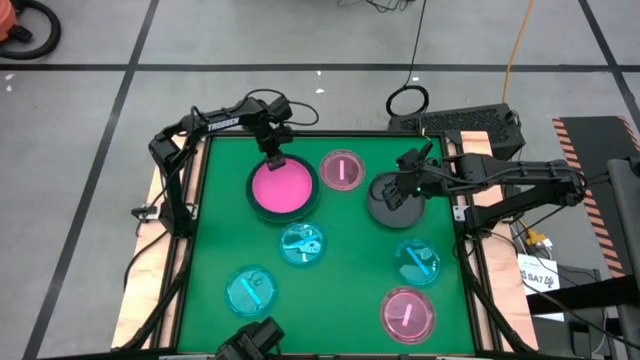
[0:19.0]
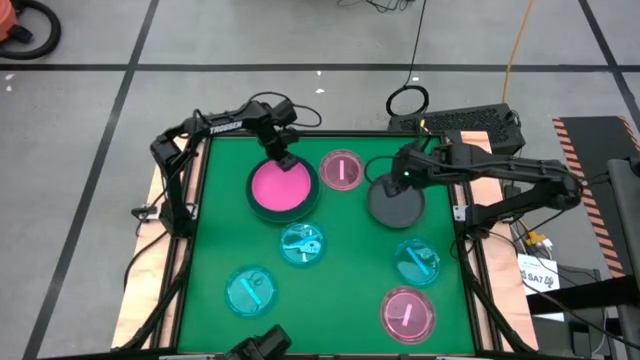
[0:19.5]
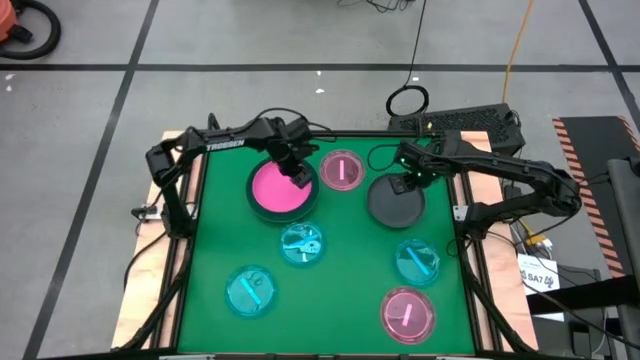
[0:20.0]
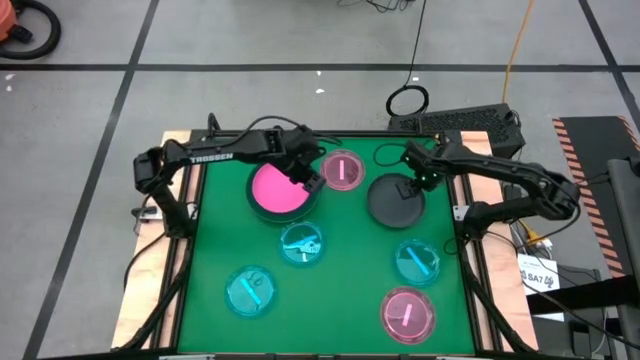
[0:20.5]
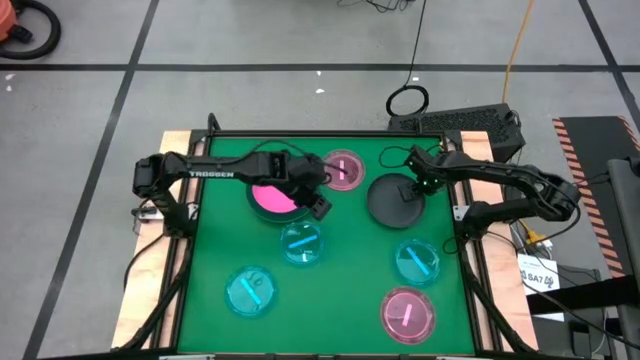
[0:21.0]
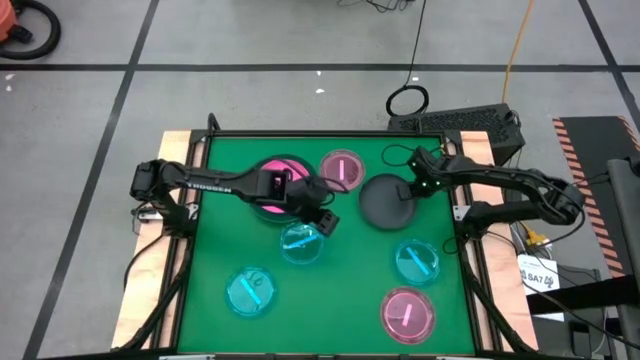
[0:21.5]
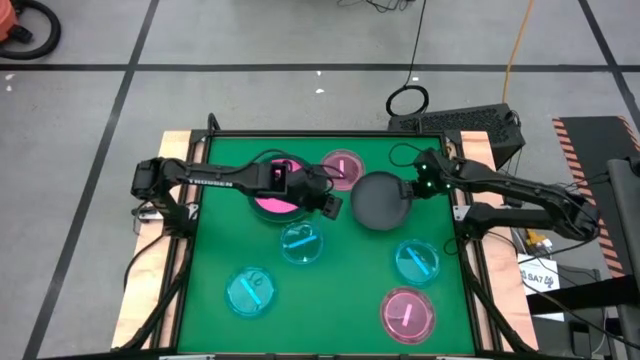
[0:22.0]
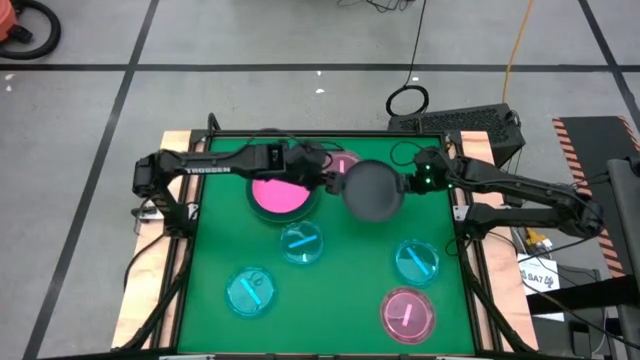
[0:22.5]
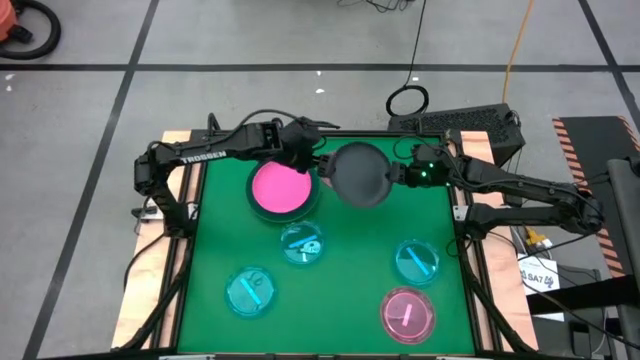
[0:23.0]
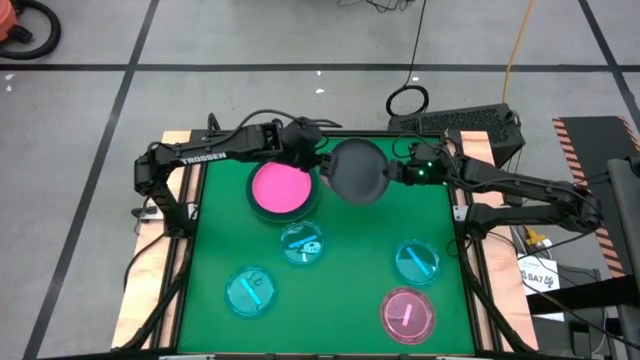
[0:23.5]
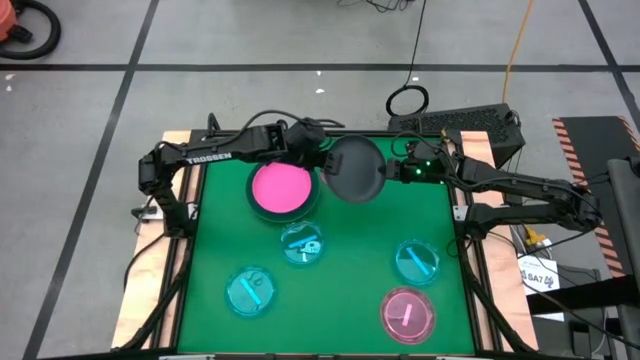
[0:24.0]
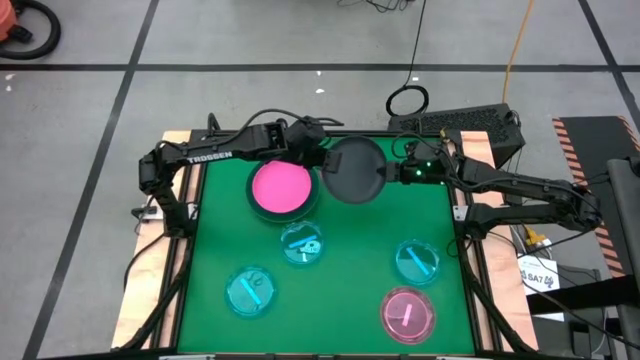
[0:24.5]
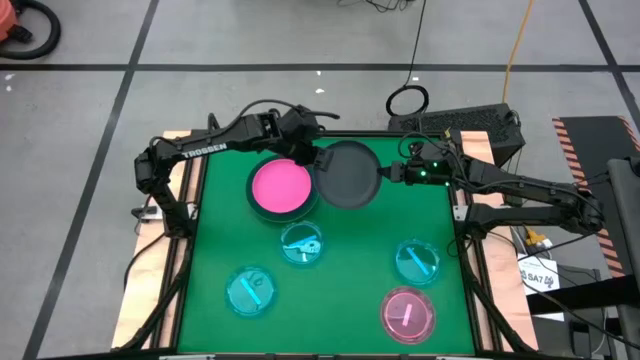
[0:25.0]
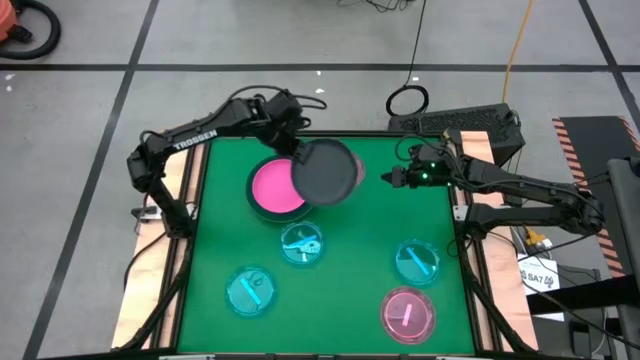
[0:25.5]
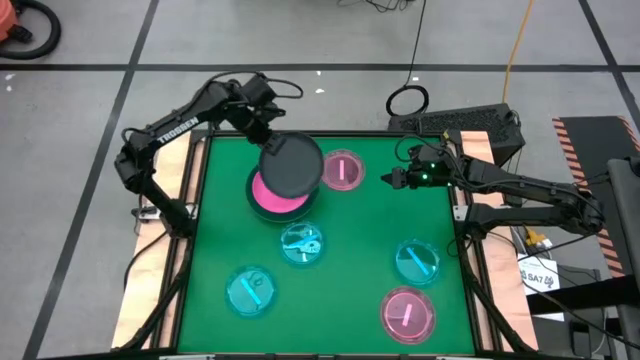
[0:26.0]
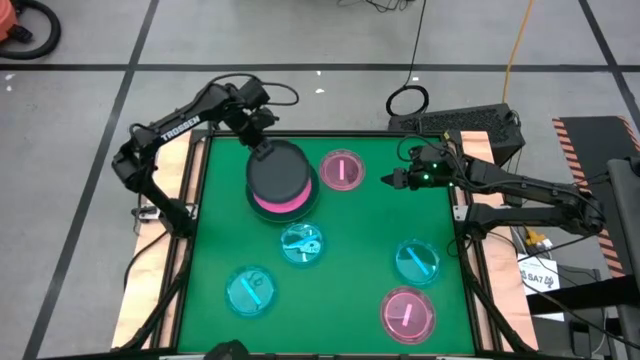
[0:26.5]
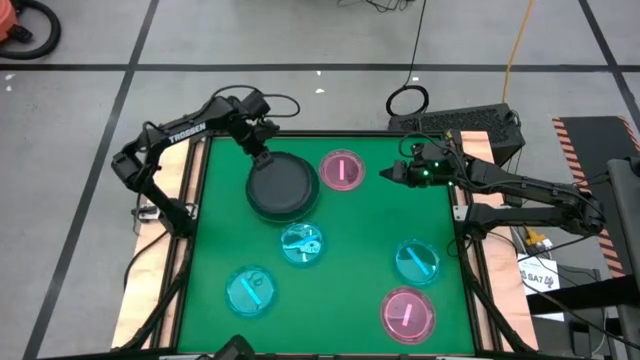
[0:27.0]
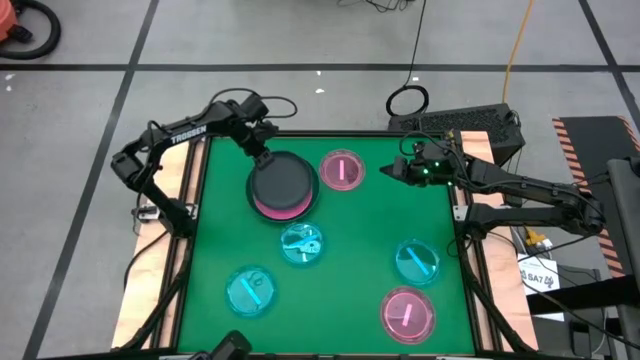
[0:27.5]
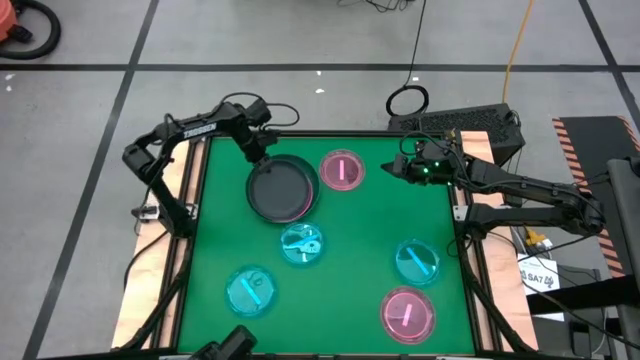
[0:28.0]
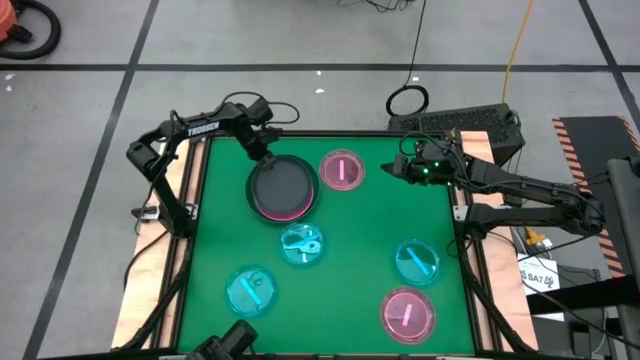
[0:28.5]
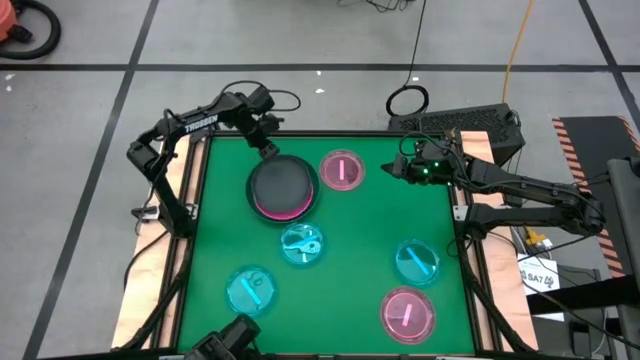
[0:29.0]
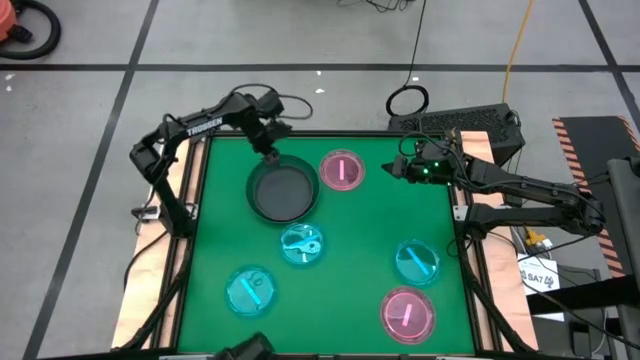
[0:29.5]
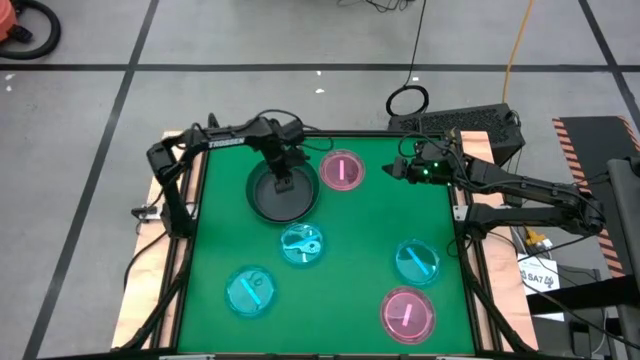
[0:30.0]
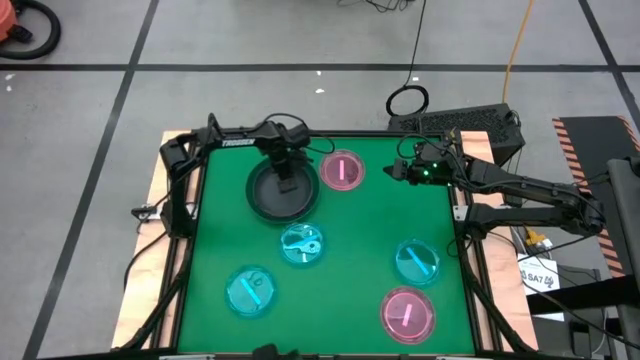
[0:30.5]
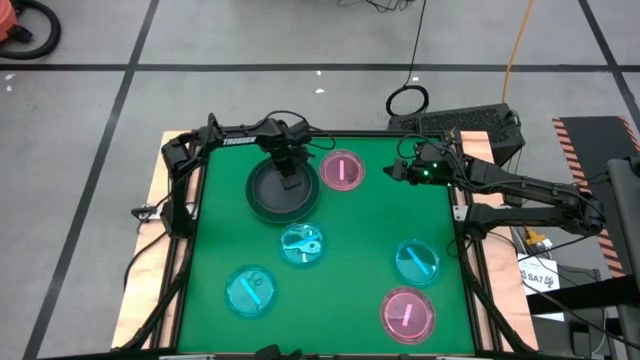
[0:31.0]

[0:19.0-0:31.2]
Task: Stack plastic plates
Stack the black plate on the pink plate

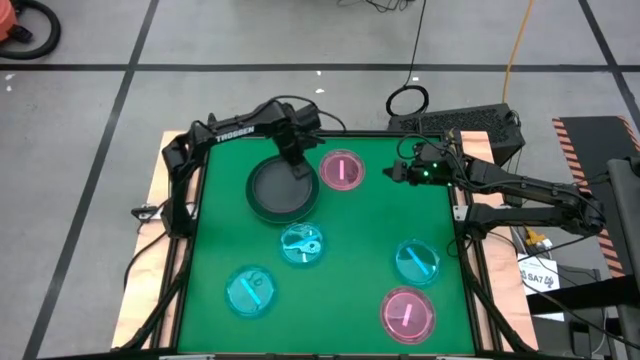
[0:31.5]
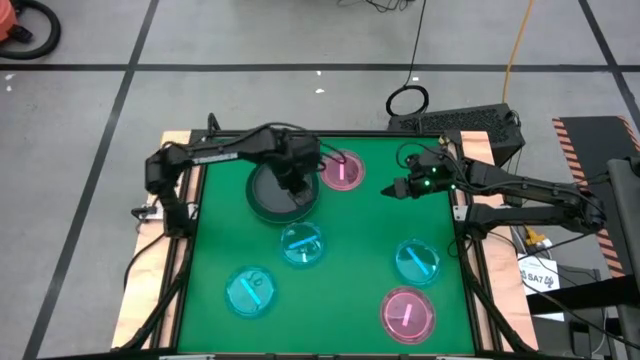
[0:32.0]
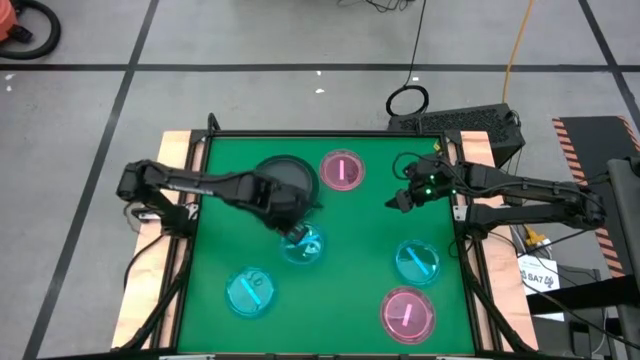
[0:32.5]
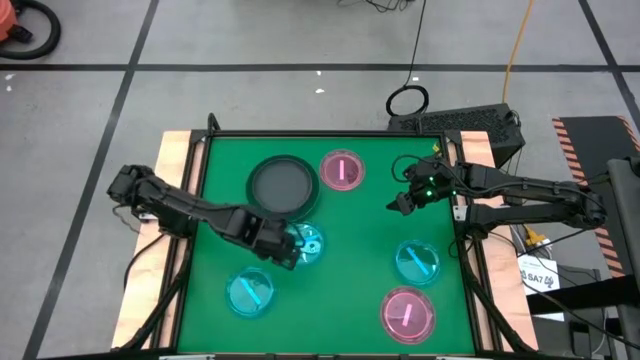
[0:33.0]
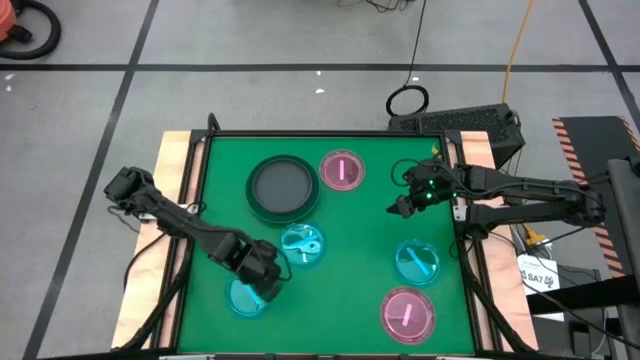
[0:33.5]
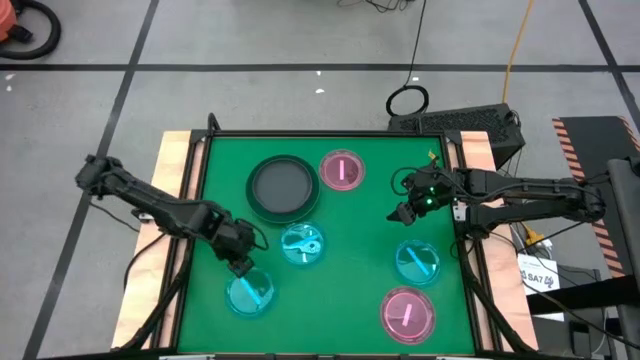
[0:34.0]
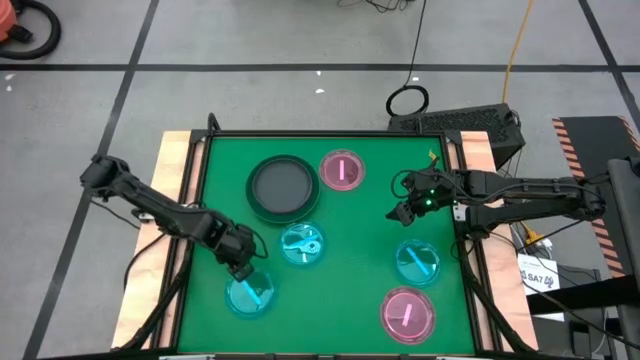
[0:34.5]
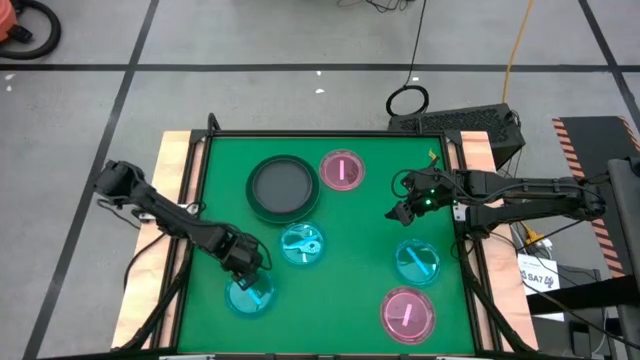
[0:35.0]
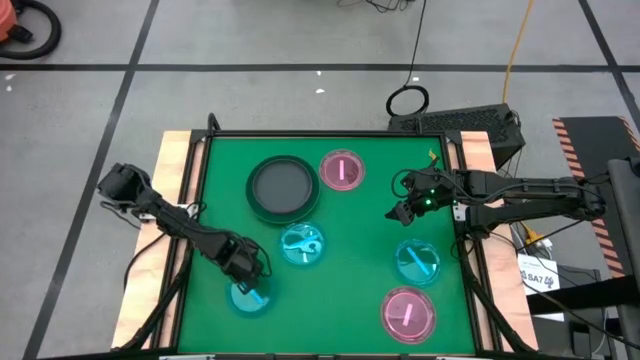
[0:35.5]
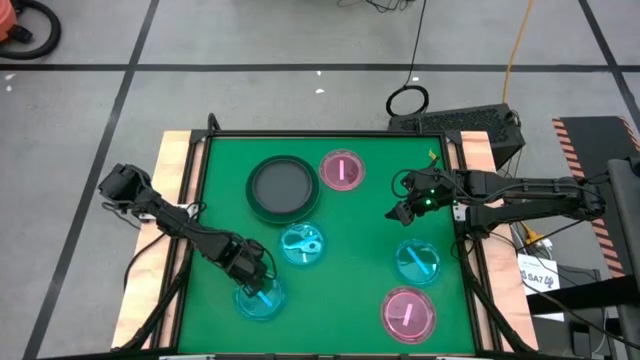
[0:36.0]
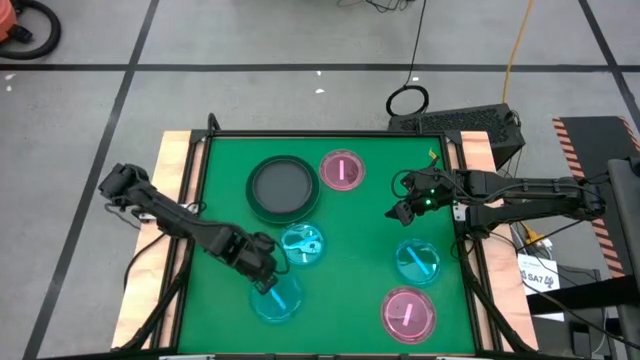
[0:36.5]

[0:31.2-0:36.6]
Stack the left blue plate on the black plate

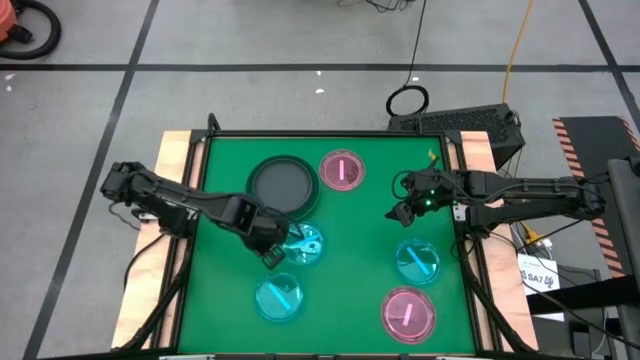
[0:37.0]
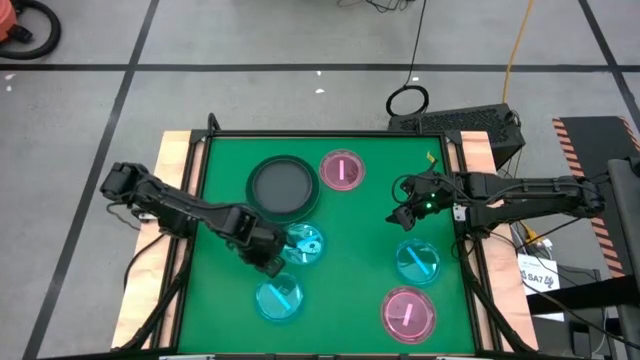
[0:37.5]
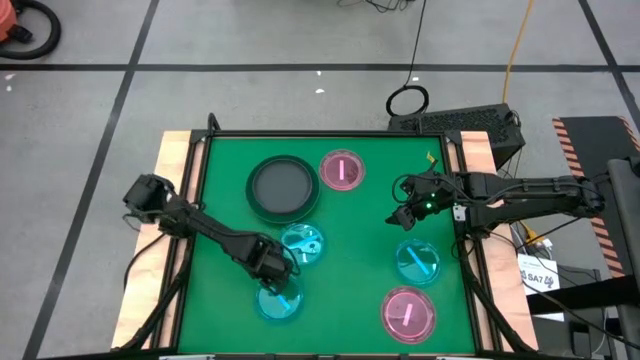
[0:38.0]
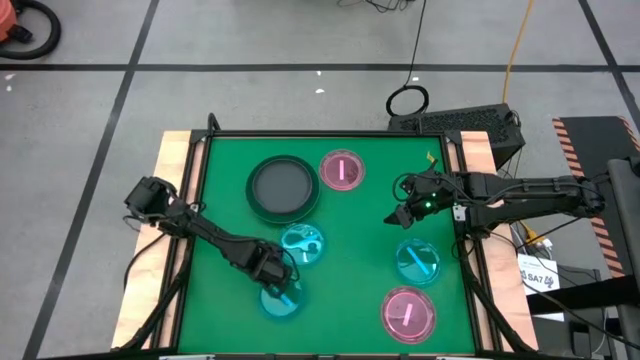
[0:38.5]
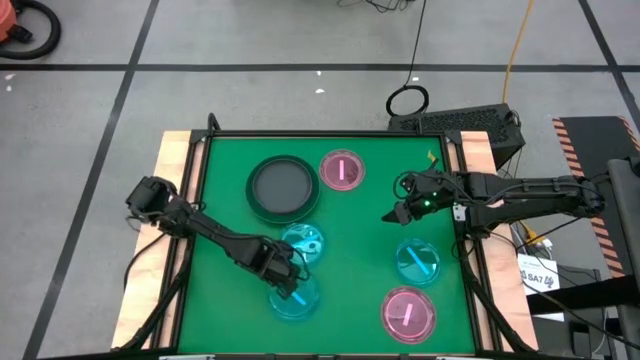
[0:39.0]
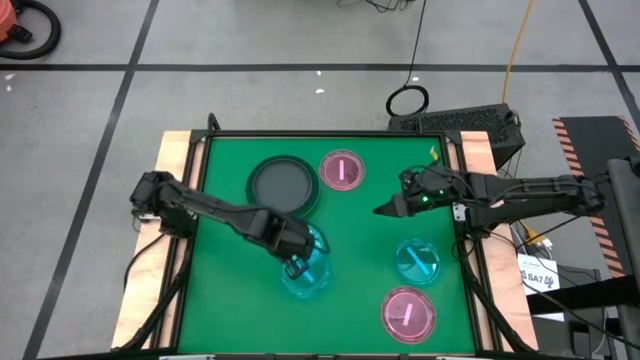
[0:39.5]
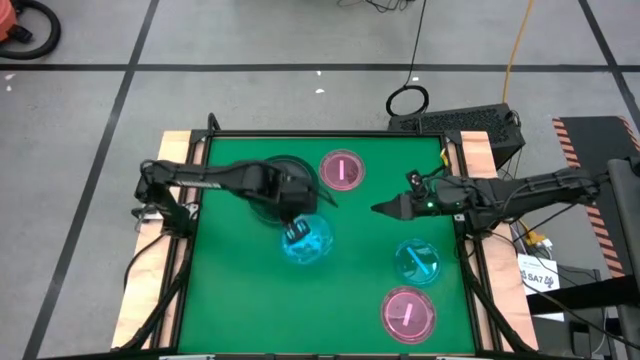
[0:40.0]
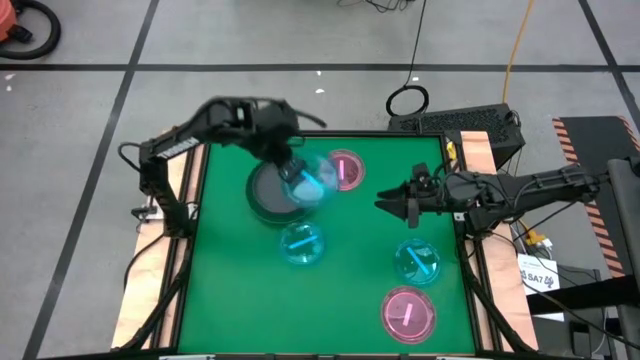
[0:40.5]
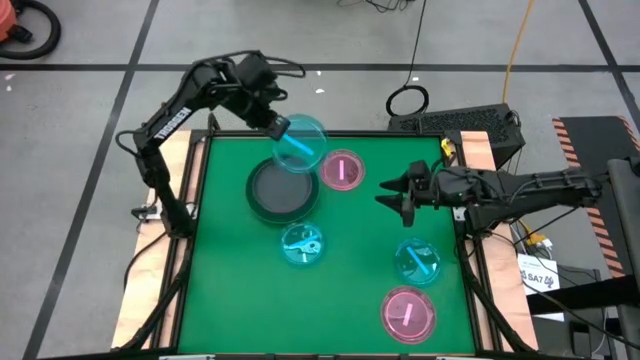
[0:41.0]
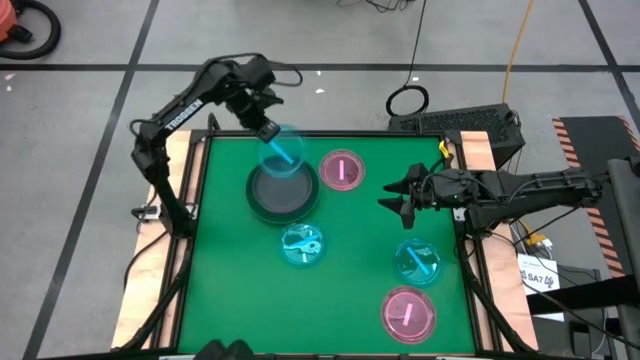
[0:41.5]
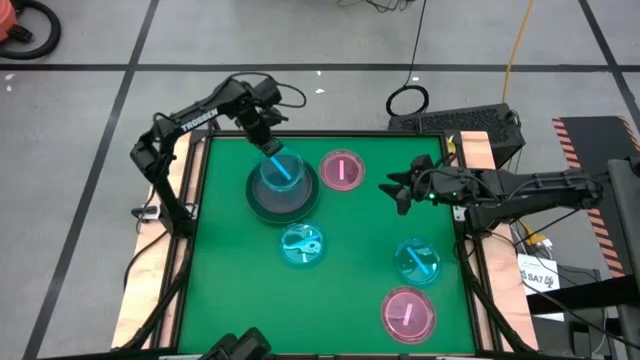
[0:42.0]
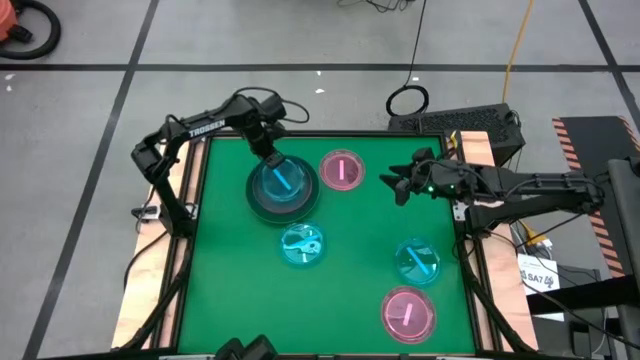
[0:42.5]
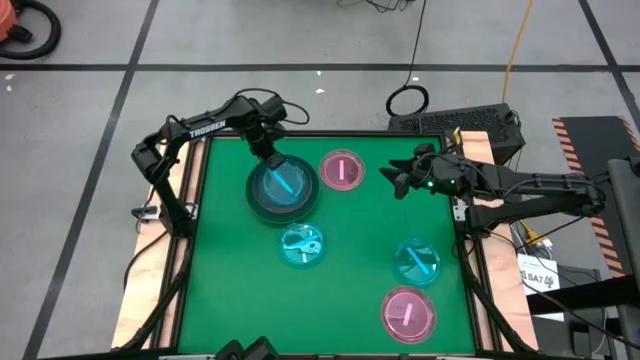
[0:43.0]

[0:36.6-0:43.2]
Stack the left blue plate on the black plate
